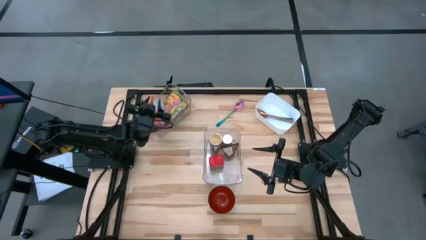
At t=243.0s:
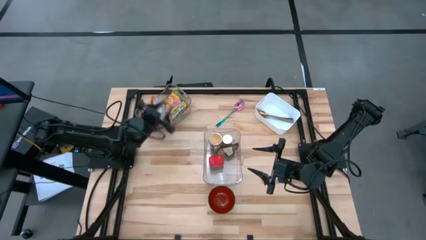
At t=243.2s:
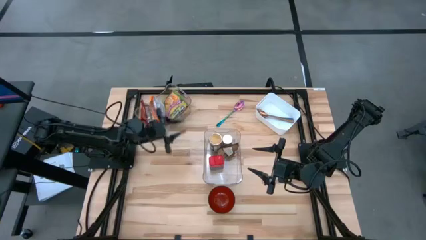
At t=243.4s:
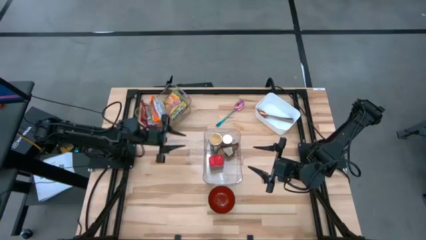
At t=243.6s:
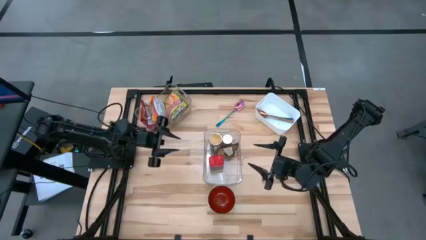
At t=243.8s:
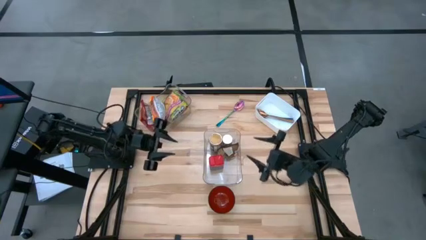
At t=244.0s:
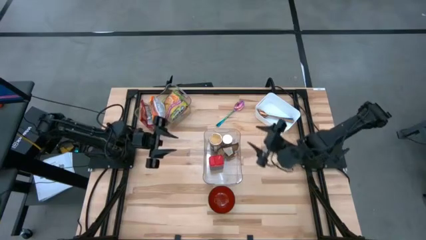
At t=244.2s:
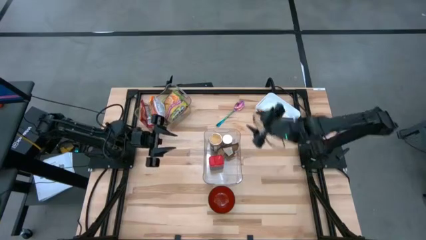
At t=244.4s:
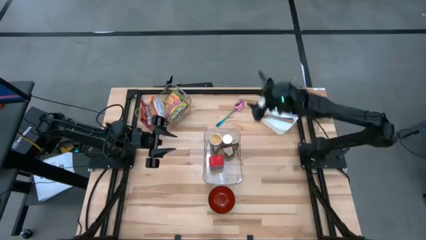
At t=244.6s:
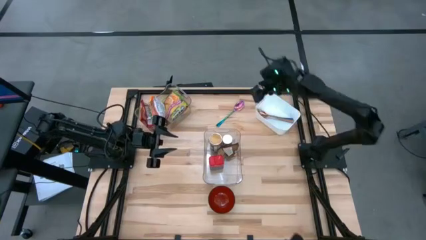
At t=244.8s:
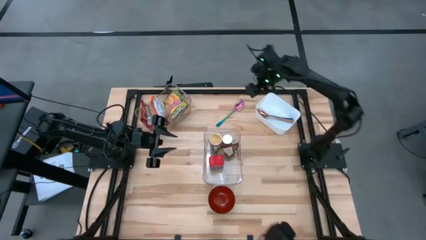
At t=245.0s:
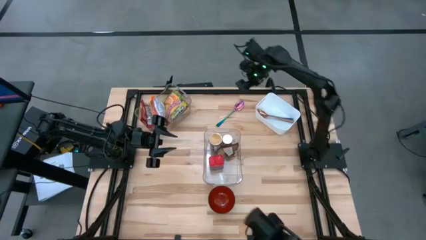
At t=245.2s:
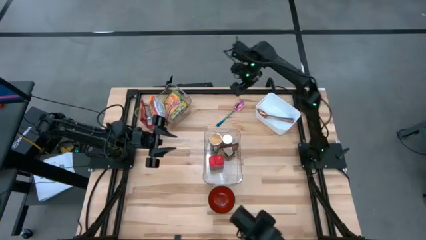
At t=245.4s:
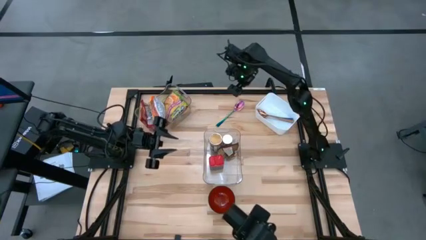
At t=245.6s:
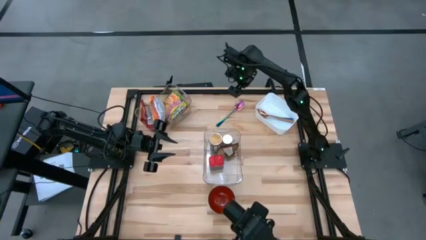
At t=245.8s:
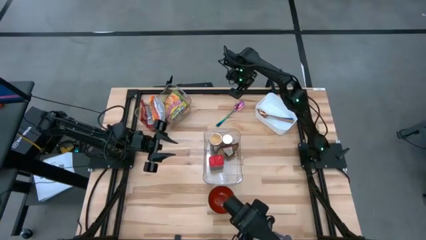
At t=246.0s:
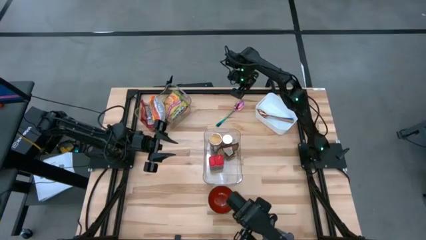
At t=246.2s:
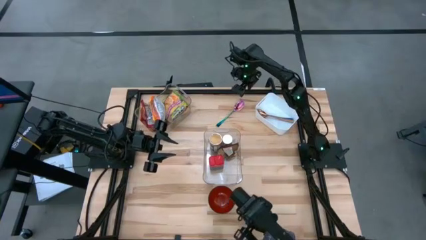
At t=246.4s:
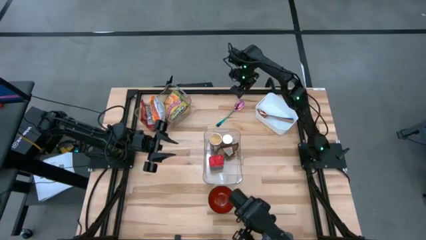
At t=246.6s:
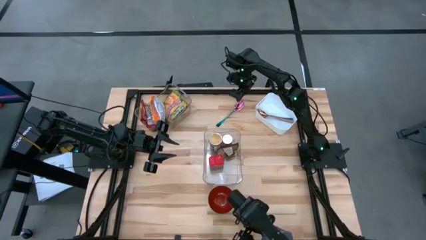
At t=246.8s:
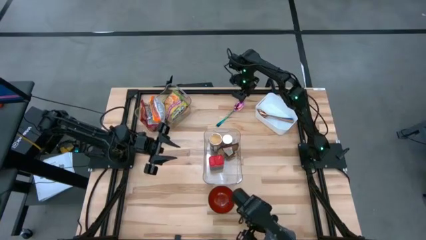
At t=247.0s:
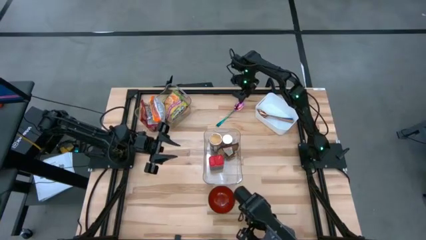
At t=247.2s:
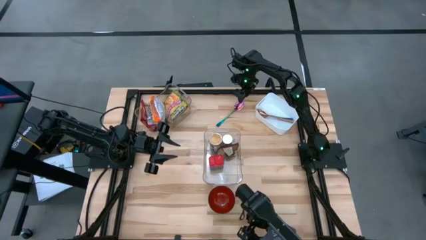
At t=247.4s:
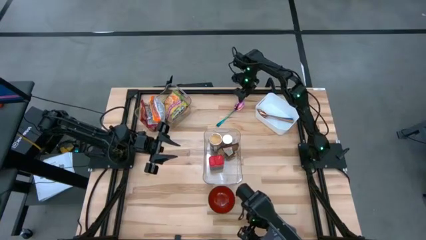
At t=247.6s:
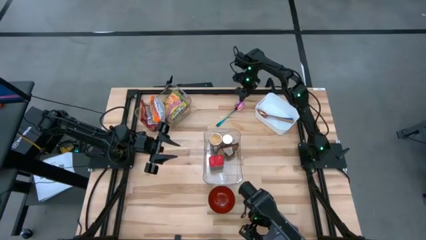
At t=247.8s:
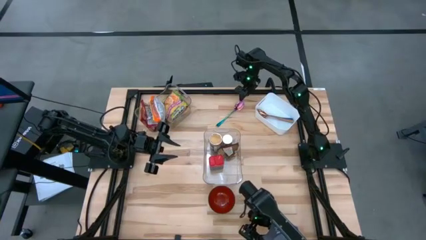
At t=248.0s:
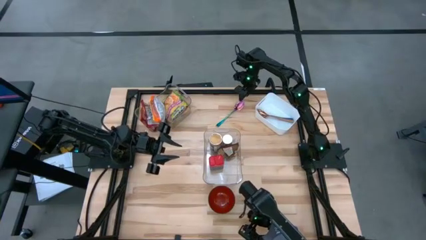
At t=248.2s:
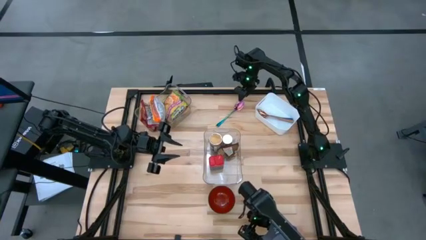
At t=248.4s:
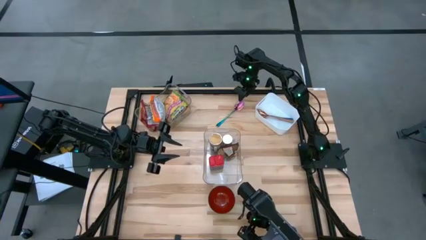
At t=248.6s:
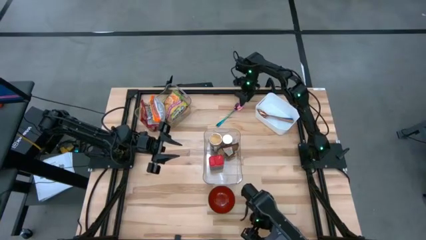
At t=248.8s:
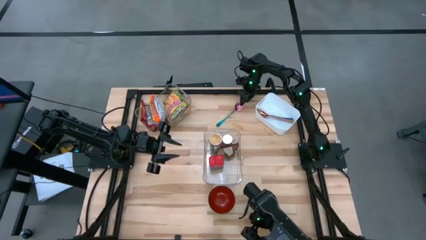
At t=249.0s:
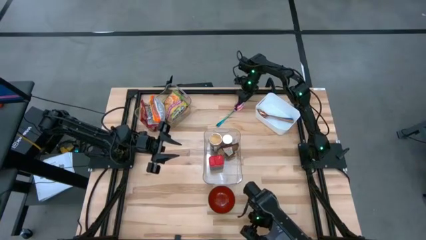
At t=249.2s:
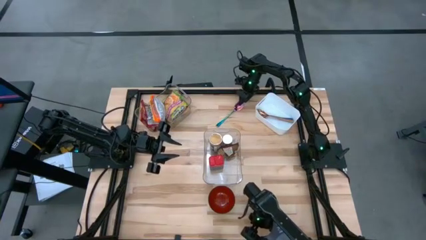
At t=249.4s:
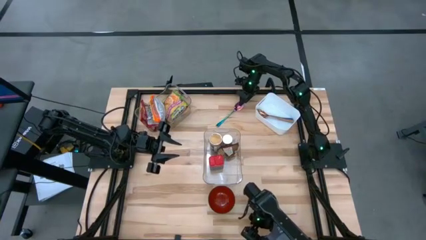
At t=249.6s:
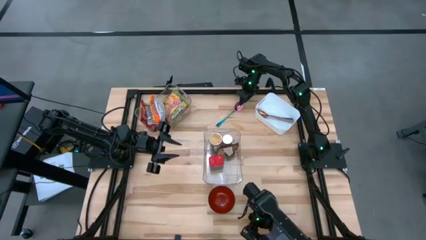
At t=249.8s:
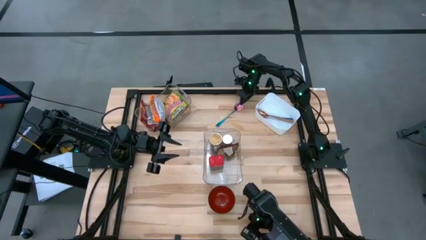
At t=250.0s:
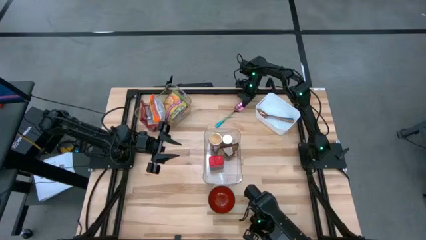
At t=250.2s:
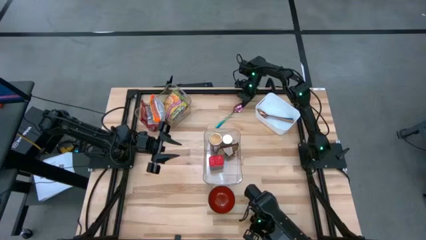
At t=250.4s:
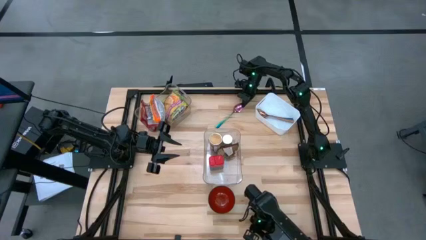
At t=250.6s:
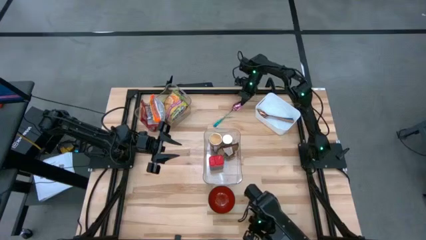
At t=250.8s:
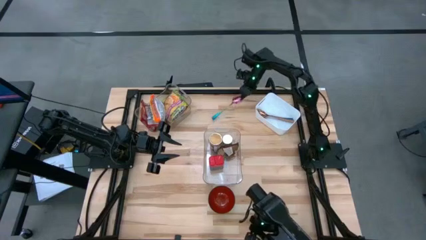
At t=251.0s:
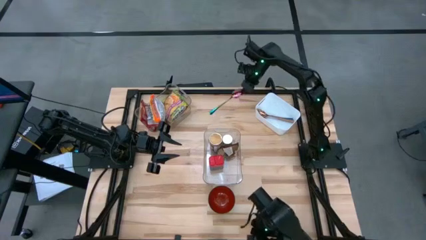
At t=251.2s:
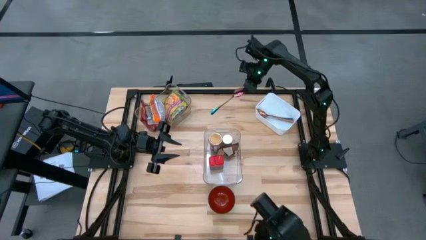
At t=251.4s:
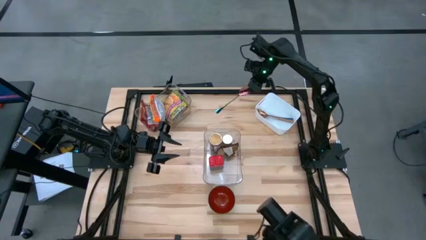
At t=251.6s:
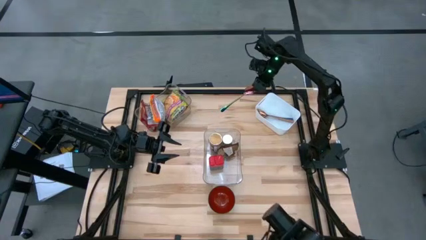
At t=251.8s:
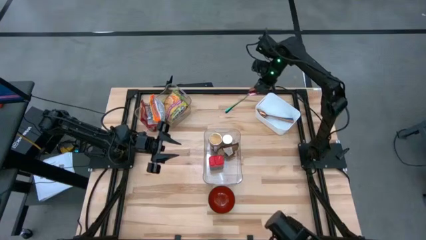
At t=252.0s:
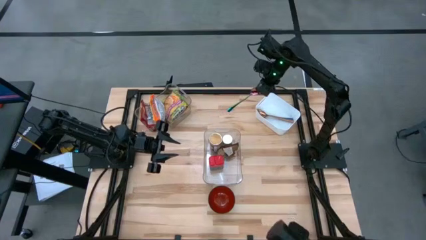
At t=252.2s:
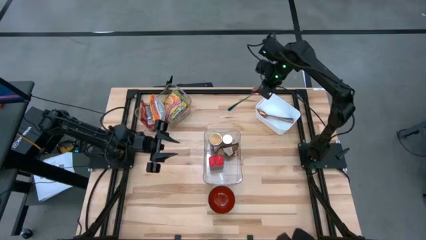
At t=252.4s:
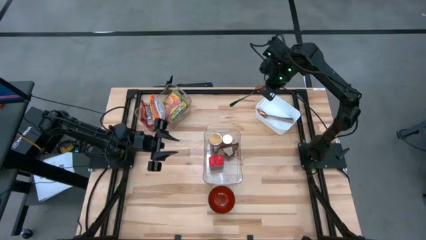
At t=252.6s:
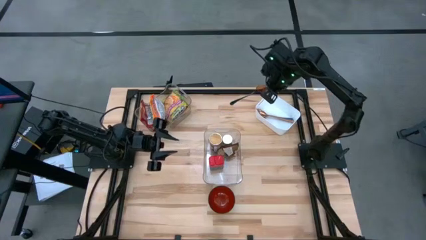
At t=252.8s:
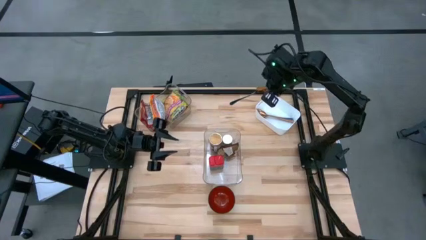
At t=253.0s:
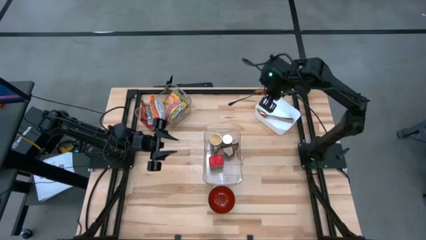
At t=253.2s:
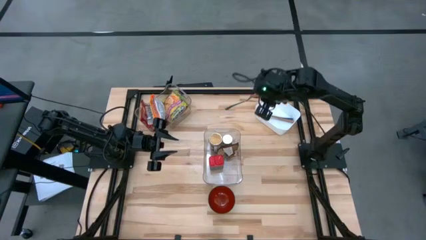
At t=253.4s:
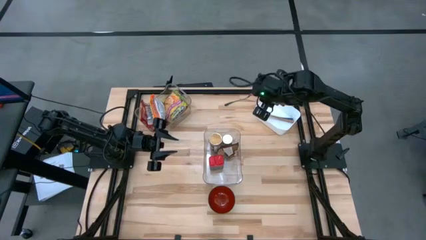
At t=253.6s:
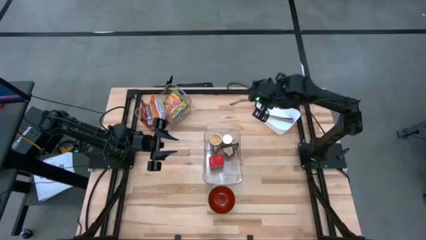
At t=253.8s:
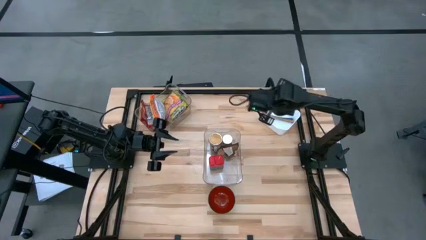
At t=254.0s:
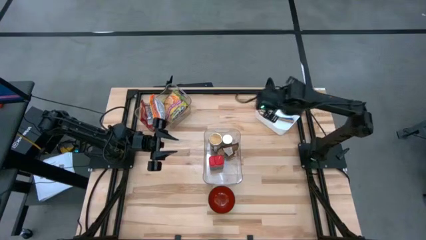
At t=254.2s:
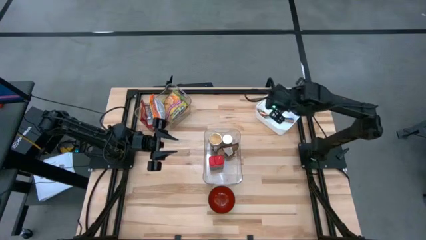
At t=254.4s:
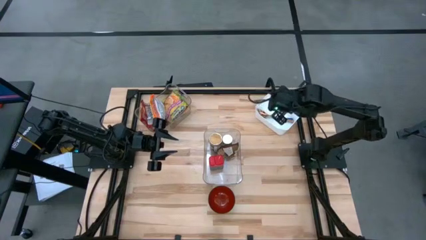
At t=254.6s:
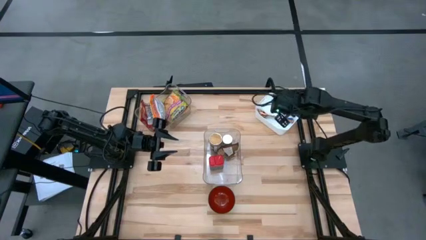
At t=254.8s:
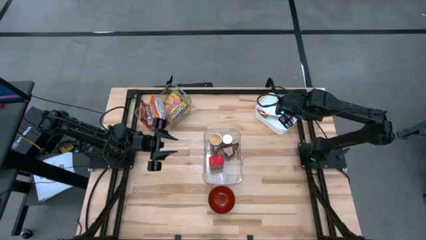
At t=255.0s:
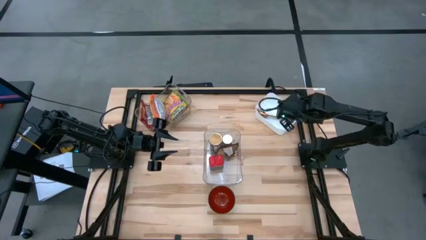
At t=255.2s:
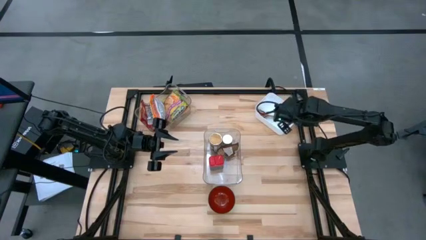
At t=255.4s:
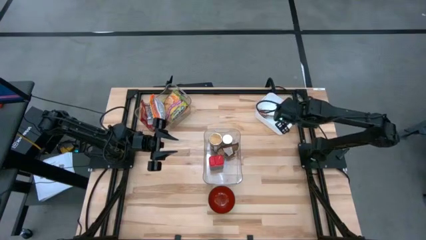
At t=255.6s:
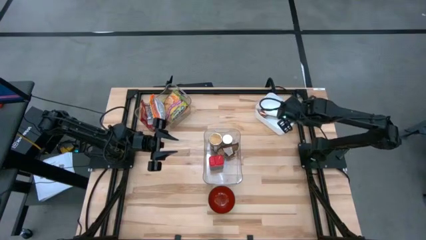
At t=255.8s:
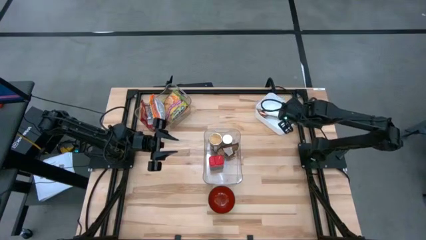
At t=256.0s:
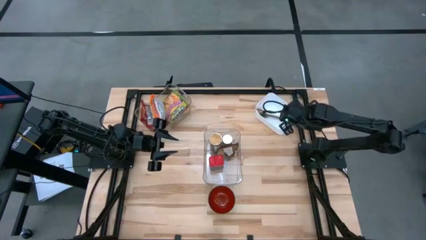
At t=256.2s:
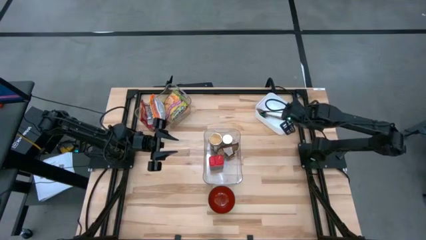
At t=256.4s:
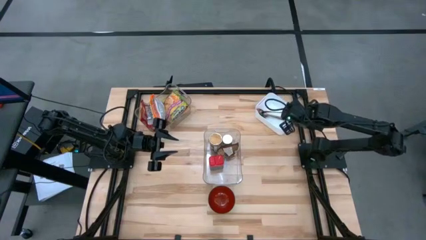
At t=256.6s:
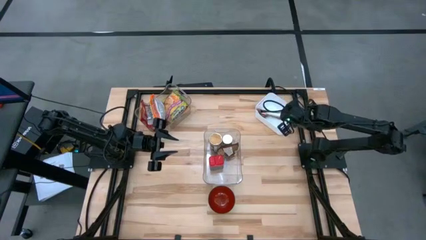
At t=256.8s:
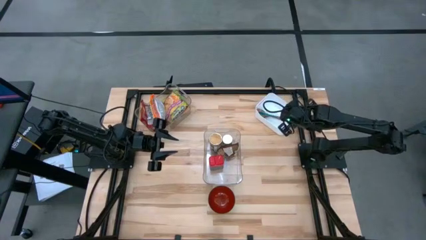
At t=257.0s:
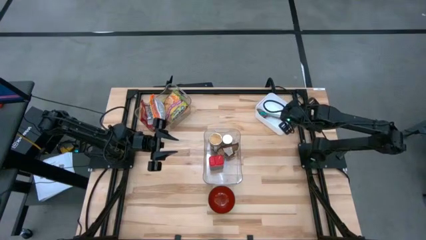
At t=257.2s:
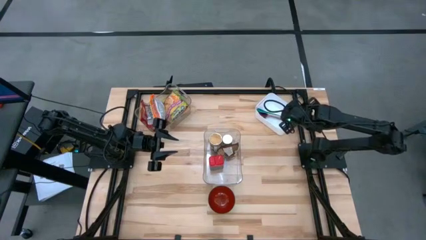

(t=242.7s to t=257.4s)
Task: Pick & Place Food Item
Put the blue spoon into the white bin
